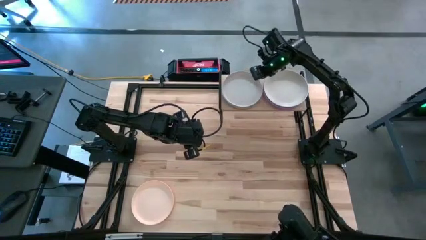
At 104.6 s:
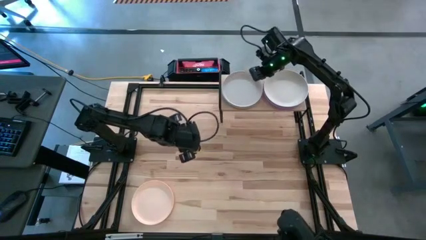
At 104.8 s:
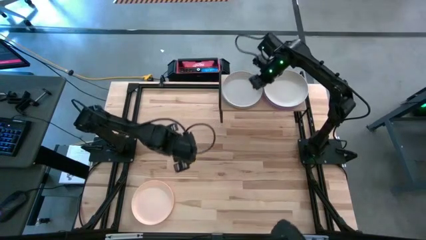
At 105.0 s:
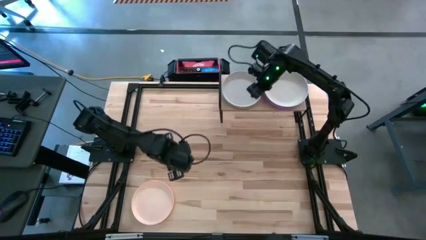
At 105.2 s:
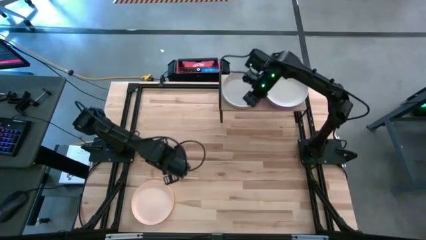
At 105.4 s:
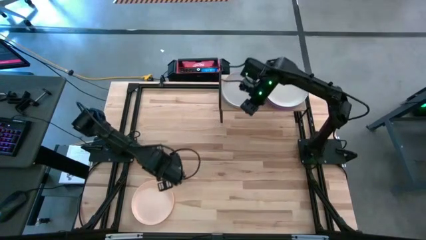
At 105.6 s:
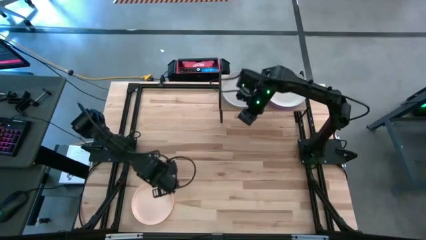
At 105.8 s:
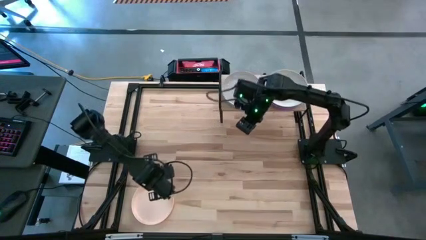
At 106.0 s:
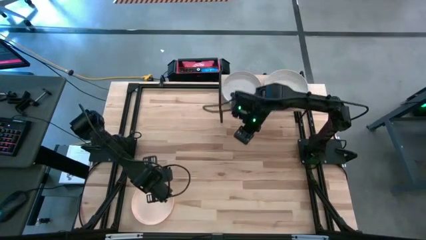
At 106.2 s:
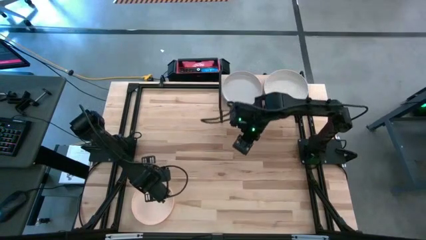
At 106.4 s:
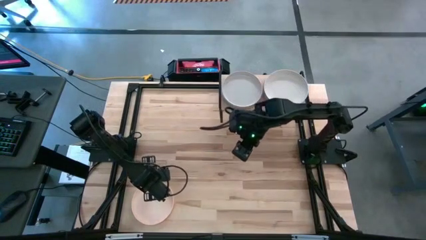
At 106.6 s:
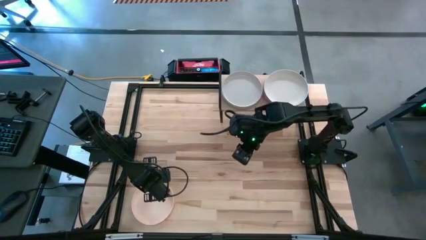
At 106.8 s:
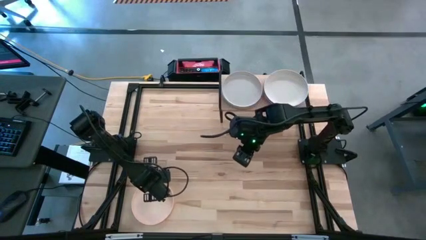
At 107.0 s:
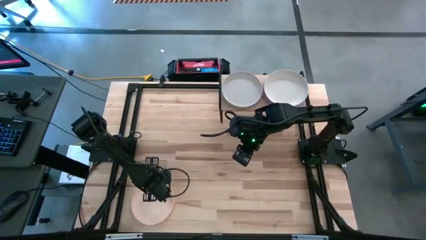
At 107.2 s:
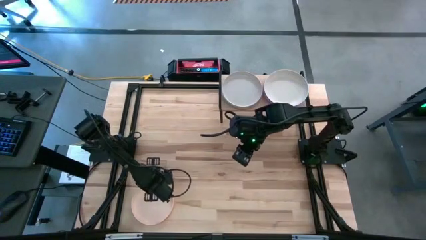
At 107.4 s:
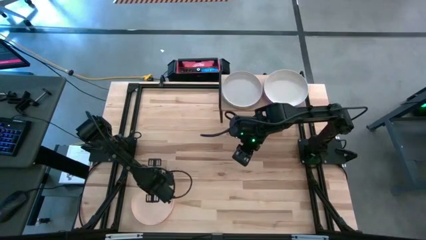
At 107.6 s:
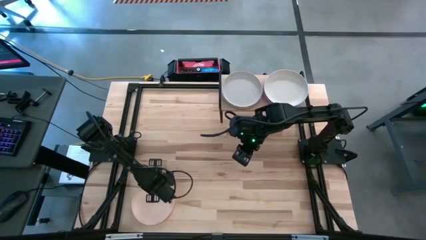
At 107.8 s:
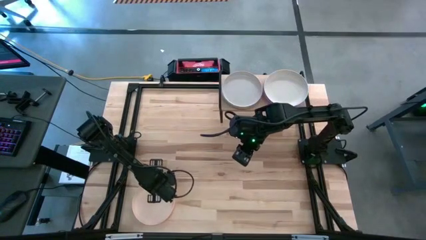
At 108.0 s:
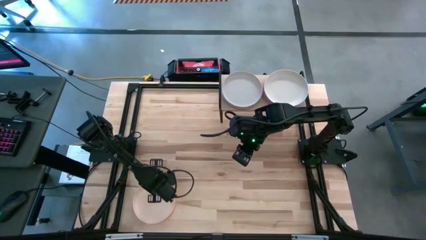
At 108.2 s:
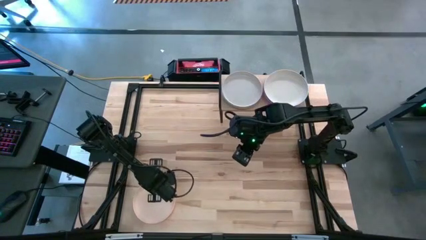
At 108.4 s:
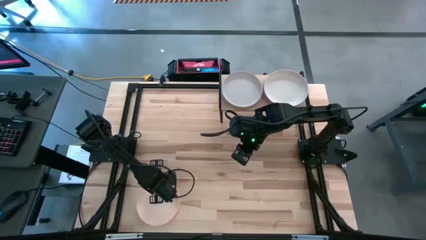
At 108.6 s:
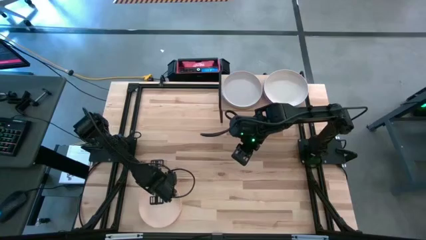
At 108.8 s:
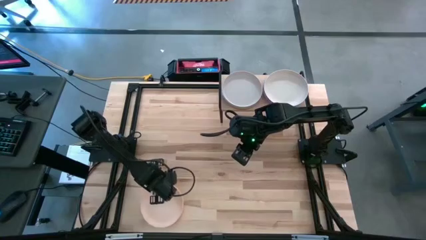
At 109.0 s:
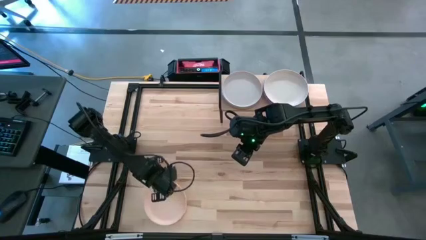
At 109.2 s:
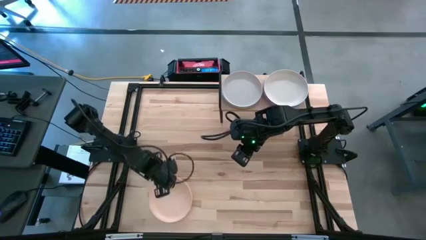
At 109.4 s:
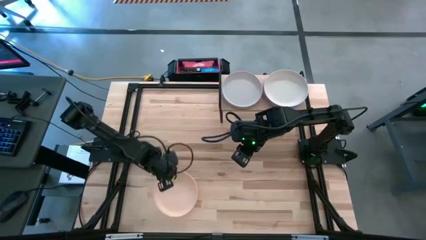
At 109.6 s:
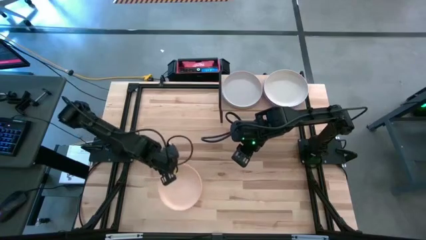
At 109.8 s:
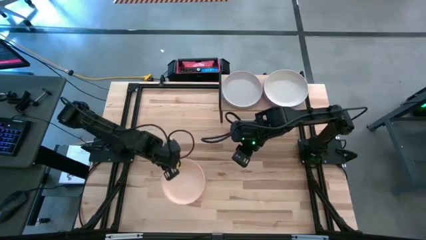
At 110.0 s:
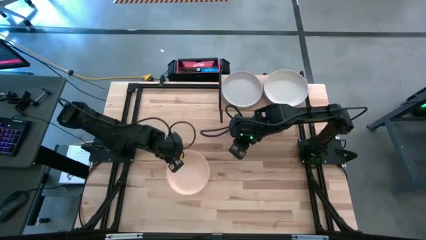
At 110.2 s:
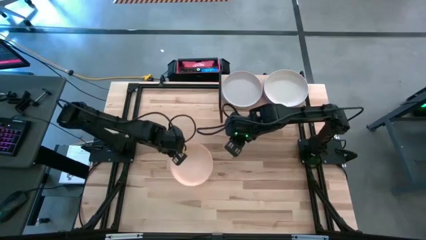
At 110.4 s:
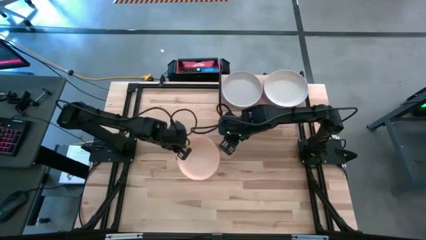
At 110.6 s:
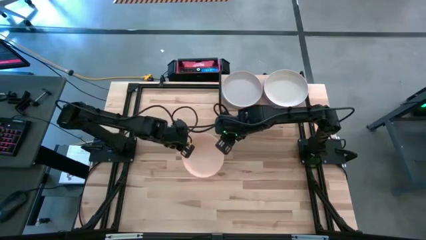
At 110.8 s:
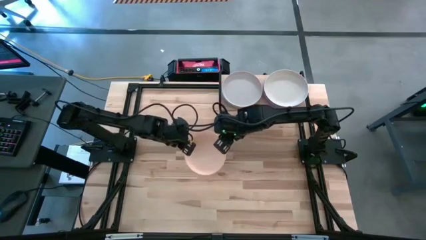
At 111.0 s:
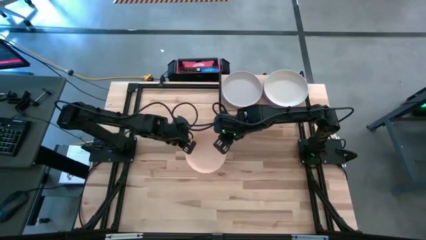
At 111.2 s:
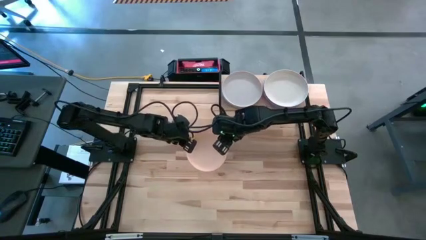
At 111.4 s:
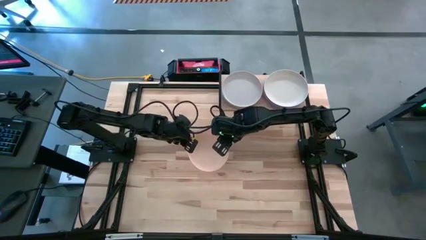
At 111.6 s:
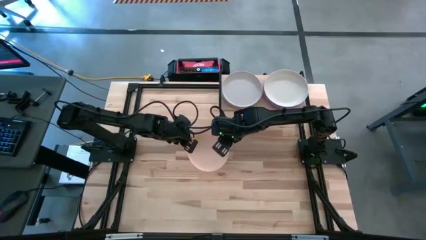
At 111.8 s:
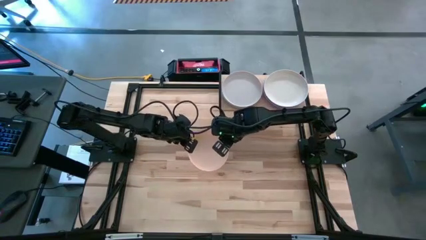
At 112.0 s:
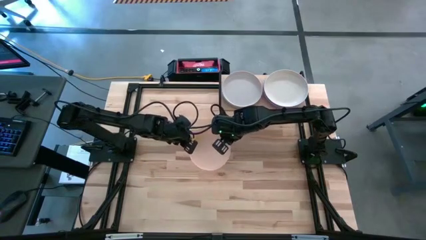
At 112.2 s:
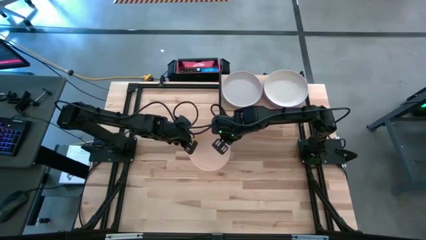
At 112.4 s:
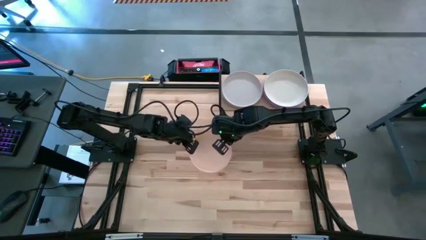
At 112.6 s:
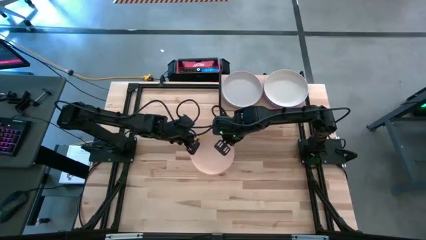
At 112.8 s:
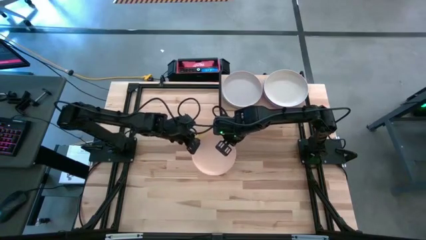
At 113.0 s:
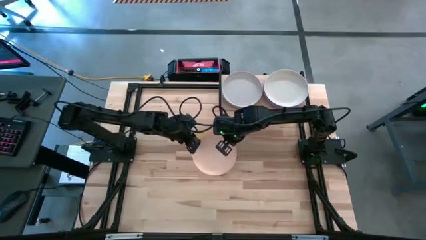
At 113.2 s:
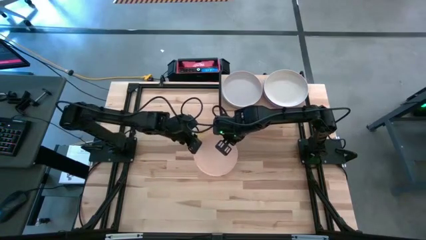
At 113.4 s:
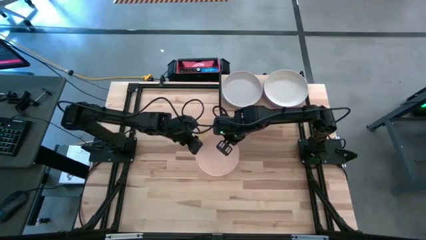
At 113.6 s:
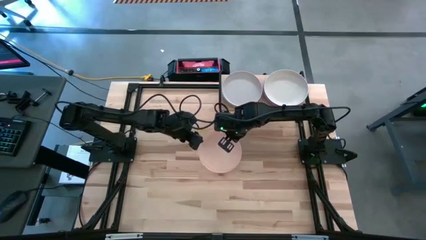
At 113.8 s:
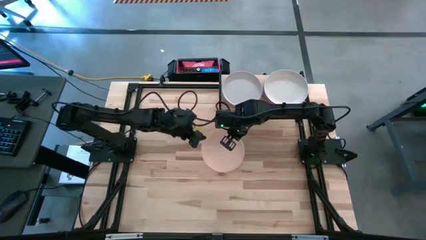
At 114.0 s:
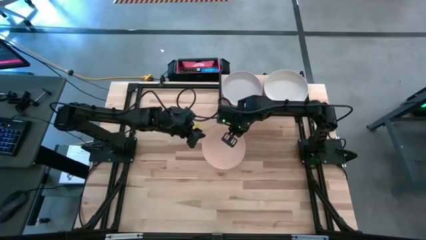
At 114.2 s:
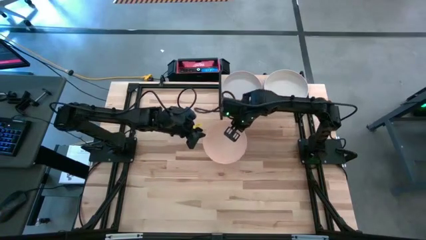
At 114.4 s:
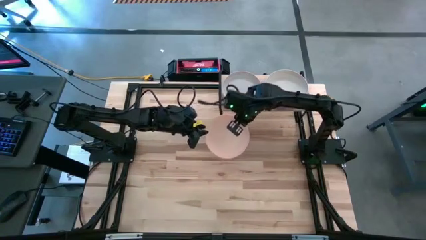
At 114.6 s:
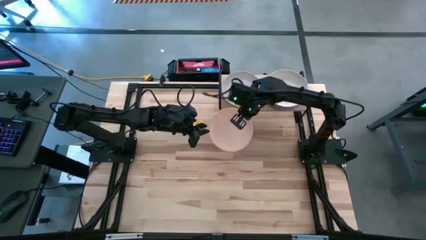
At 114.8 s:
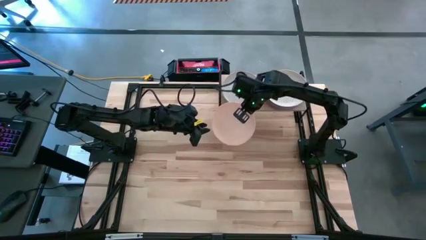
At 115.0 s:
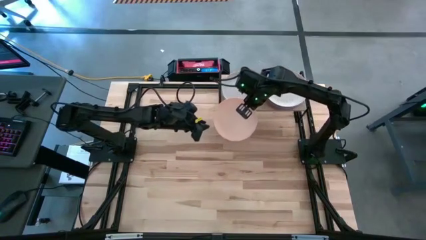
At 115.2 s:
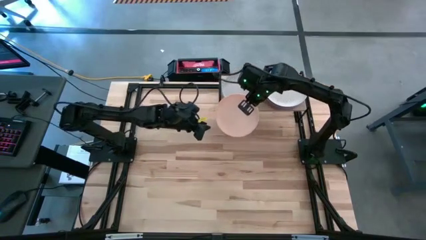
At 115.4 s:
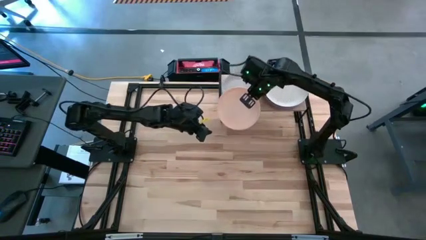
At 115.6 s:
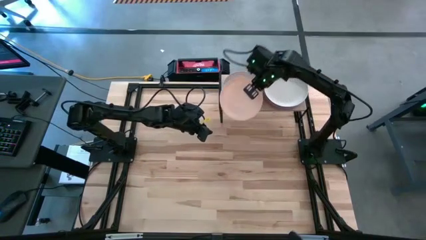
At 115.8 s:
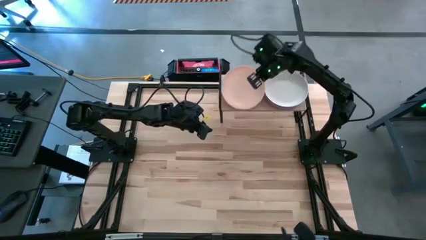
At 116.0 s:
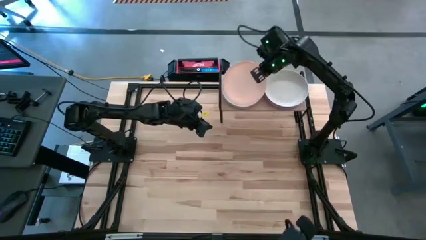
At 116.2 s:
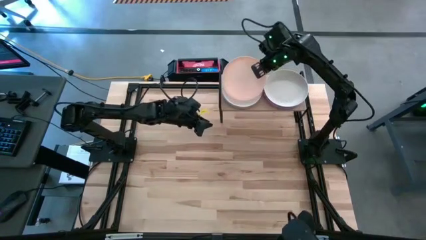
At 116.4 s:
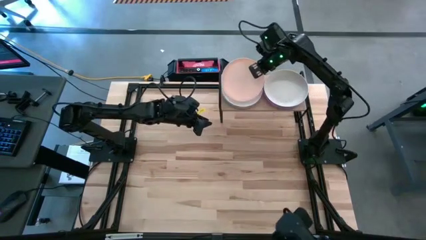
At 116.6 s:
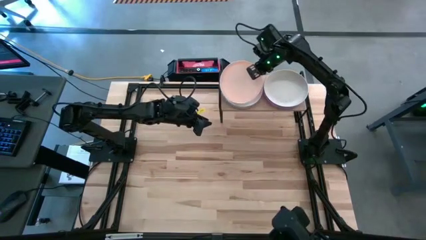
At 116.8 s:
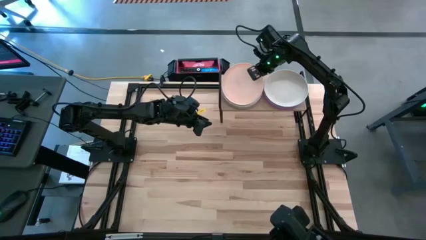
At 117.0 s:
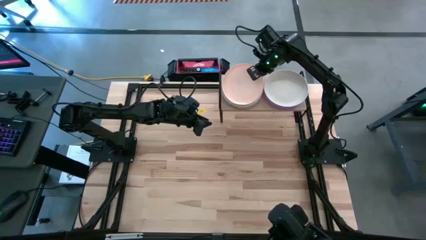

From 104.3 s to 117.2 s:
Task: Place and stack plates onto a shelf
Stack the light pink plate on top of the gray plate on the shelf

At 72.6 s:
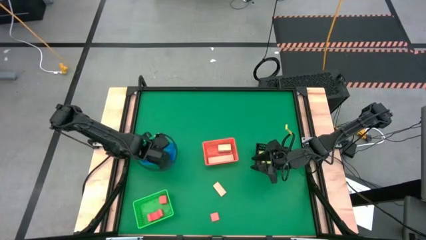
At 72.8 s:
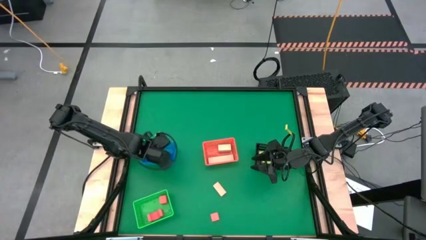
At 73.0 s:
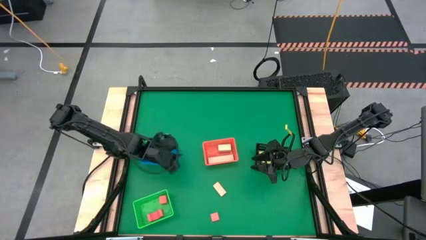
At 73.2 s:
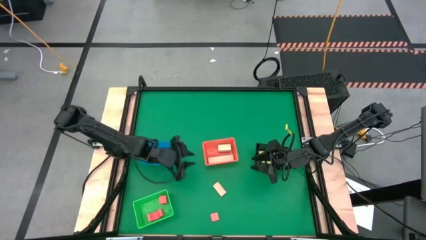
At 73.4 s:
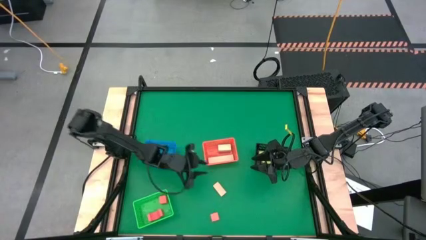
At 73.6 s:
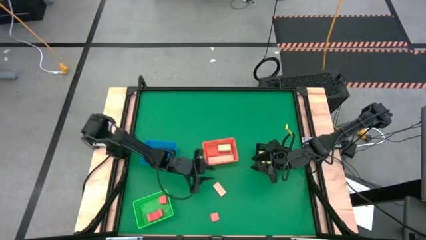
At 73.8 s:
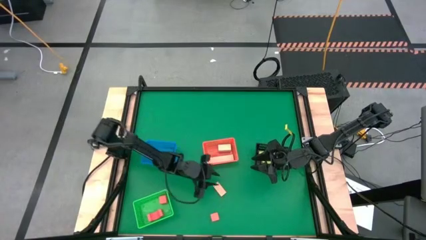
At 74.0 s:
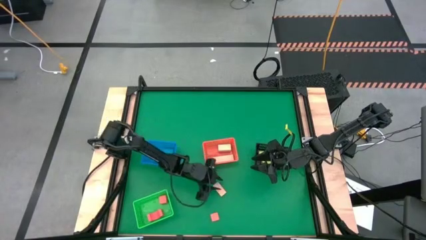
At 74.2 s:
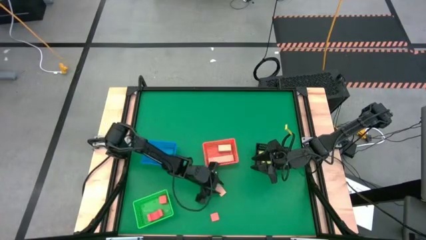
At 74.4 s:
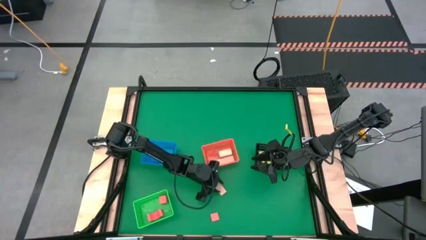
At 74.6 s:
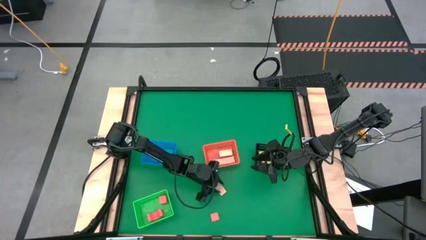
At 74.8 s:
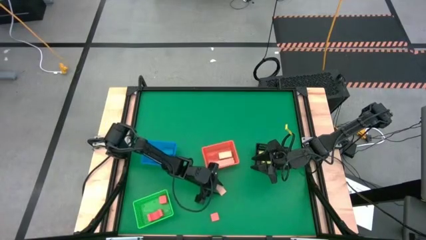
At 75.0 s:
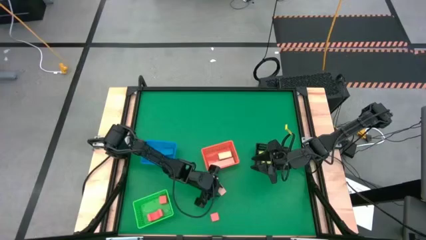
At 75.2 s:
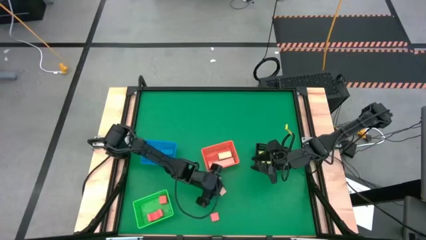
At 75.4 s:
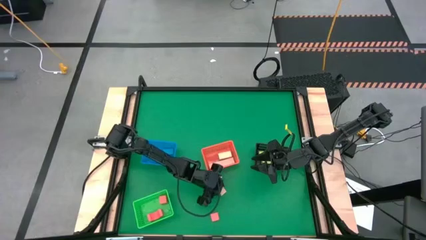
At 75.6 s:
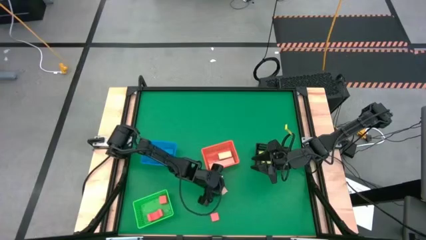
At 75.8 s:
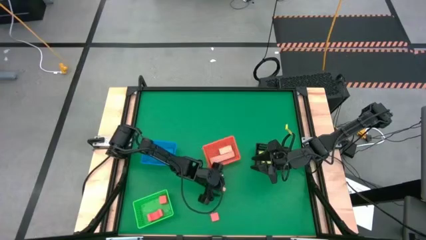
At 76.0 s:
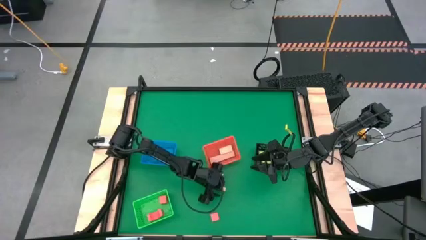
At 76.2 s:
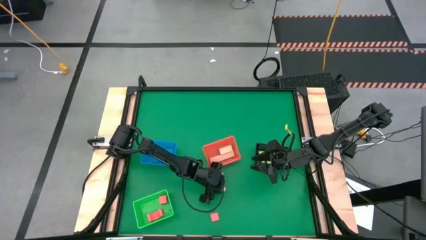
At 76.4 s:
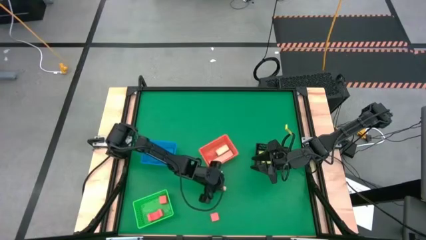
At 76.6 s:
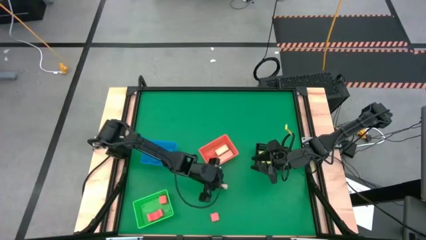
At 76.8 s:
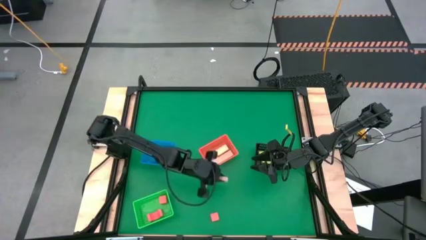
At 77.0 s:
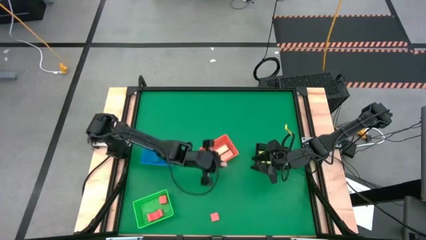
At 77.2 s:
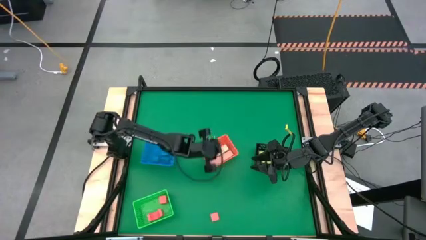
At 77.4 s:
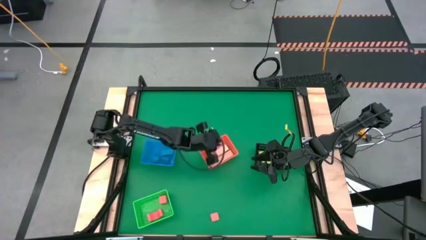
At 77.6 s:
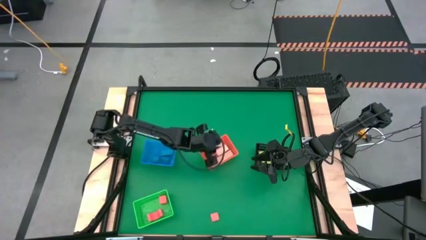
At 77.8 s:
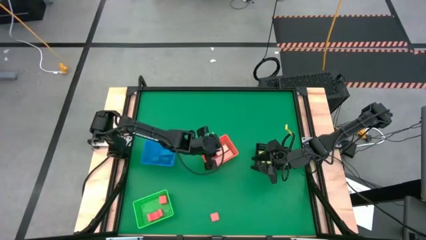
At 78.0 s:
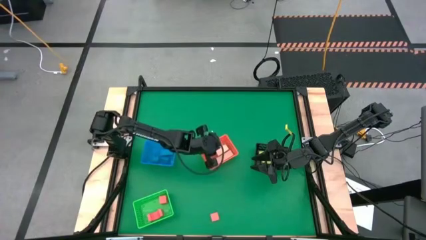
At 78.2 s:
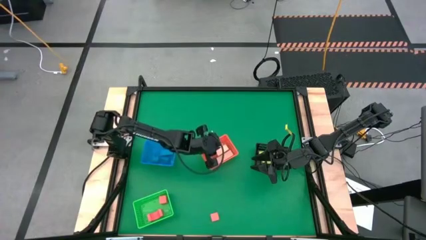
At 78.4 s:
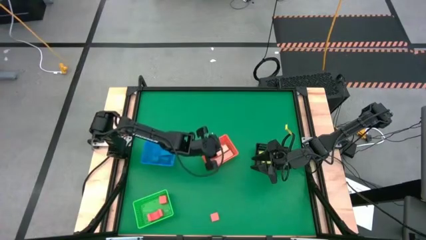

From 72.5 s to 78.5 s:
Task: Sort & place blocks by color
Put the brown block into the orange bin
